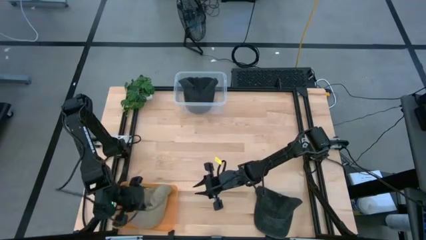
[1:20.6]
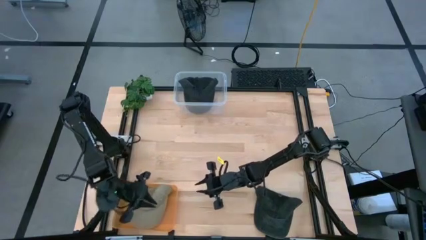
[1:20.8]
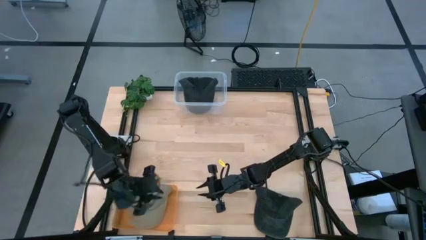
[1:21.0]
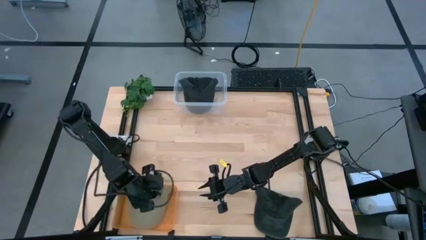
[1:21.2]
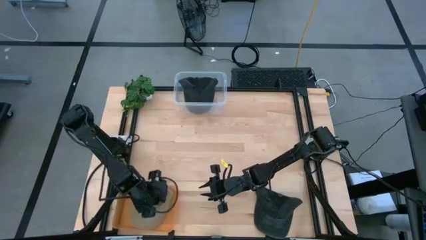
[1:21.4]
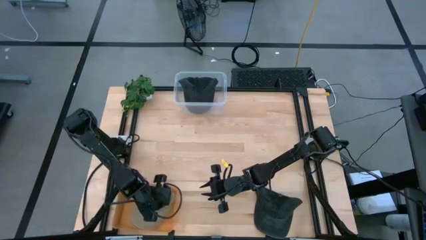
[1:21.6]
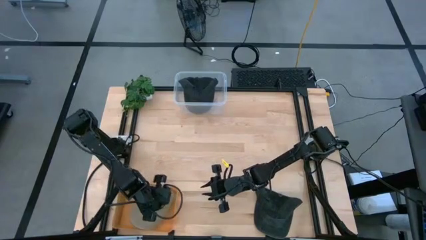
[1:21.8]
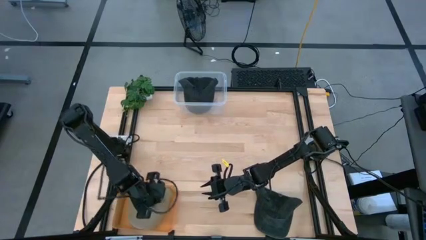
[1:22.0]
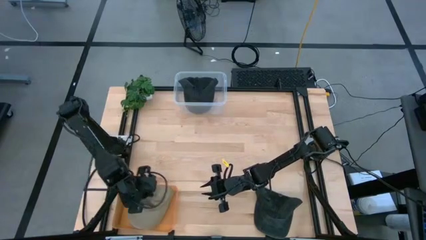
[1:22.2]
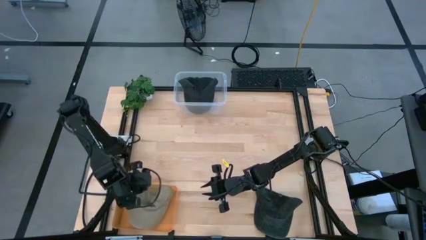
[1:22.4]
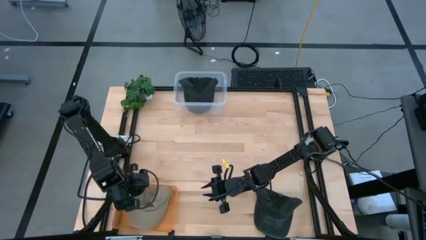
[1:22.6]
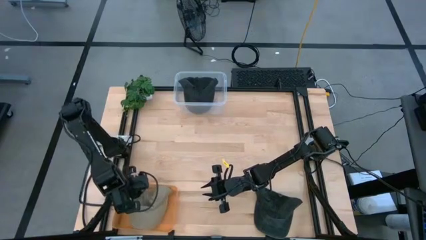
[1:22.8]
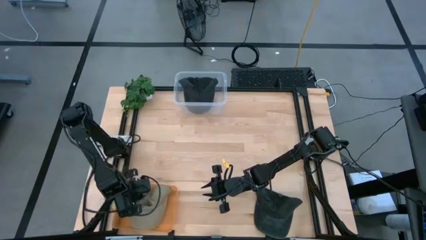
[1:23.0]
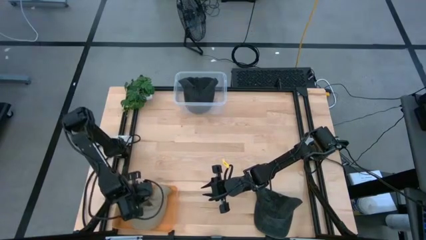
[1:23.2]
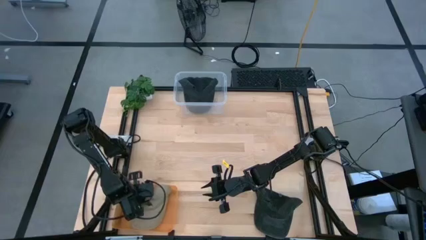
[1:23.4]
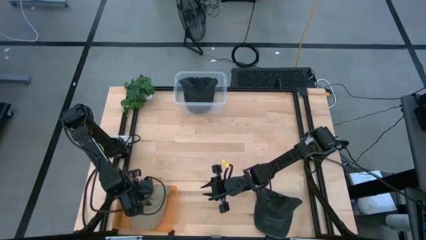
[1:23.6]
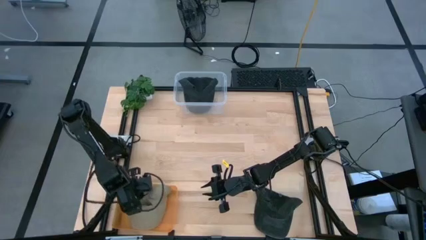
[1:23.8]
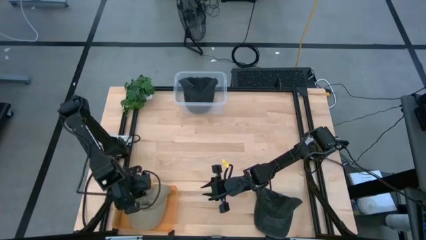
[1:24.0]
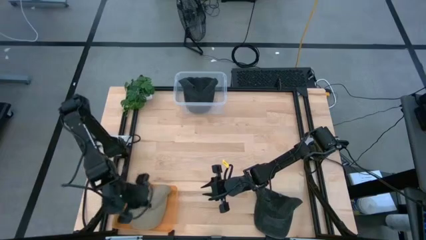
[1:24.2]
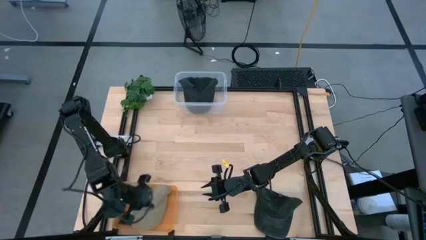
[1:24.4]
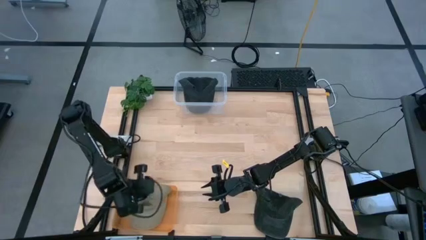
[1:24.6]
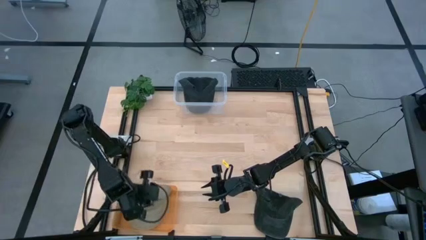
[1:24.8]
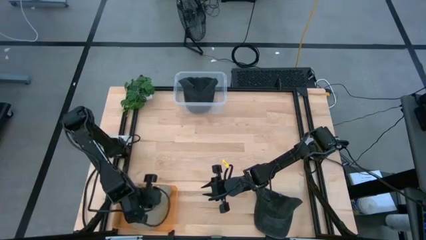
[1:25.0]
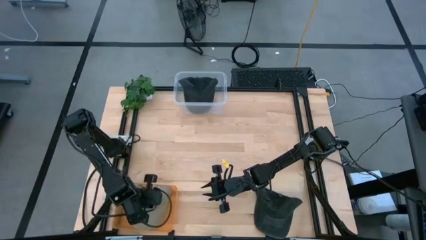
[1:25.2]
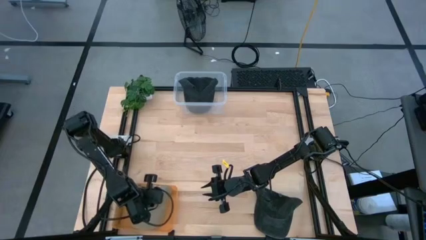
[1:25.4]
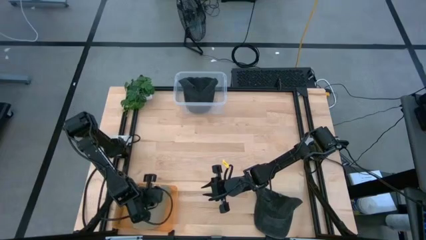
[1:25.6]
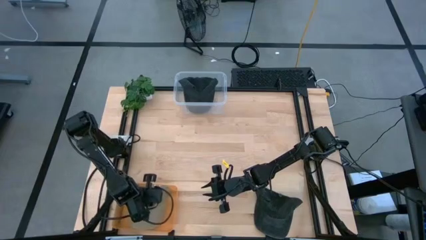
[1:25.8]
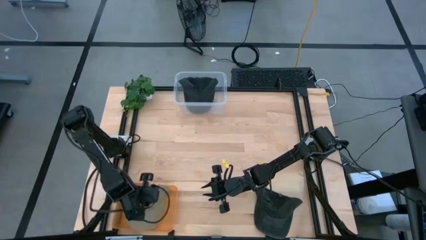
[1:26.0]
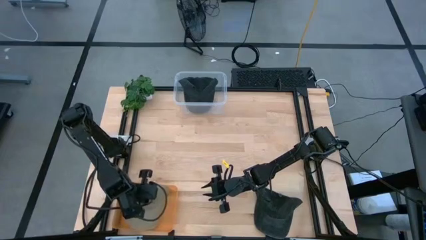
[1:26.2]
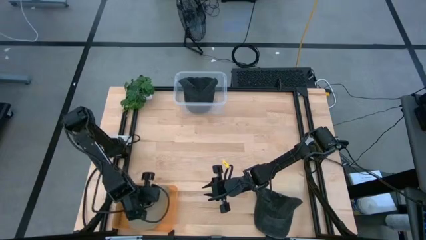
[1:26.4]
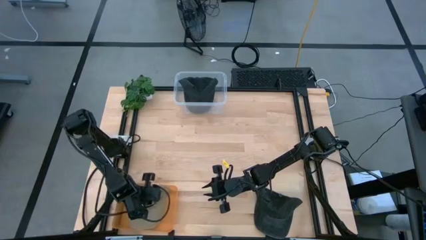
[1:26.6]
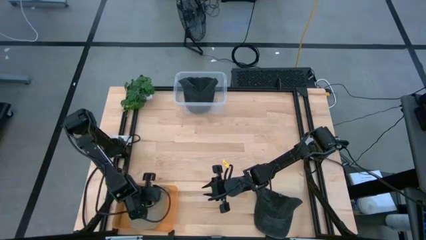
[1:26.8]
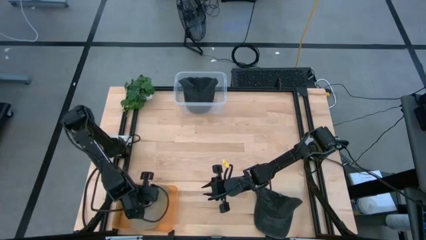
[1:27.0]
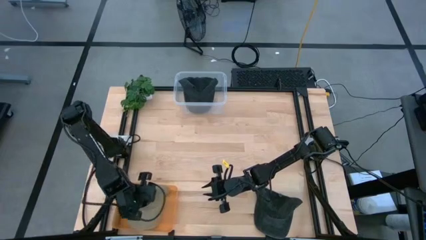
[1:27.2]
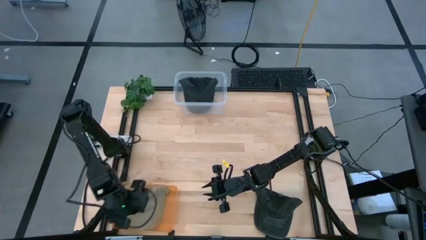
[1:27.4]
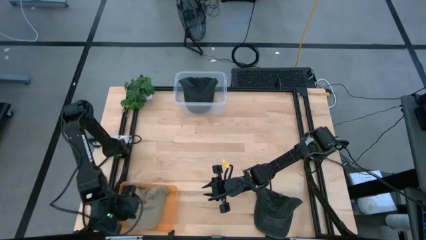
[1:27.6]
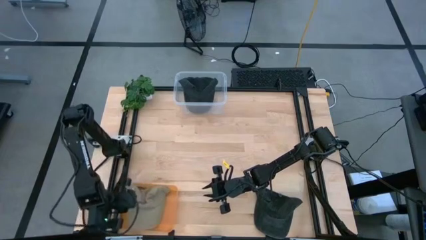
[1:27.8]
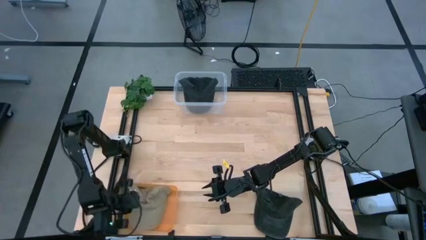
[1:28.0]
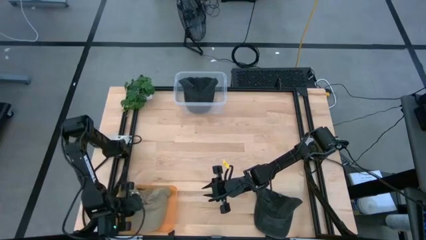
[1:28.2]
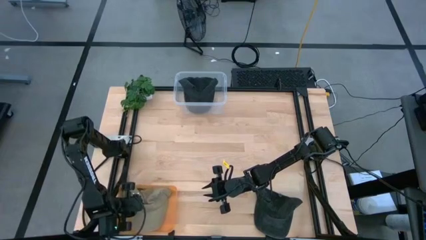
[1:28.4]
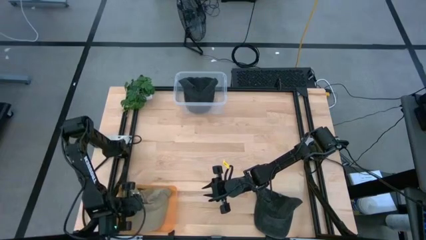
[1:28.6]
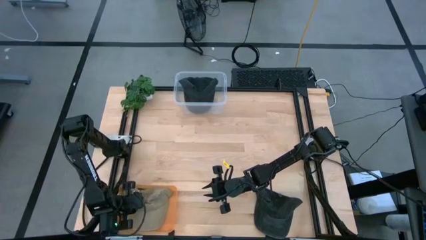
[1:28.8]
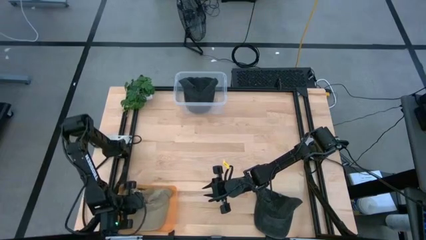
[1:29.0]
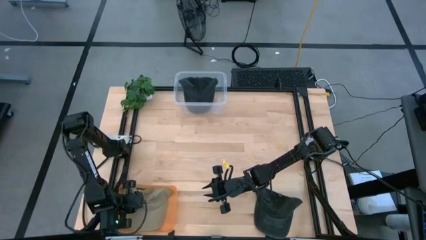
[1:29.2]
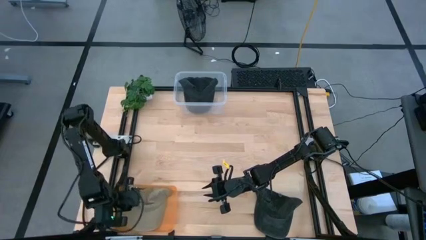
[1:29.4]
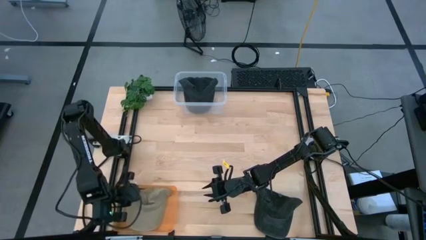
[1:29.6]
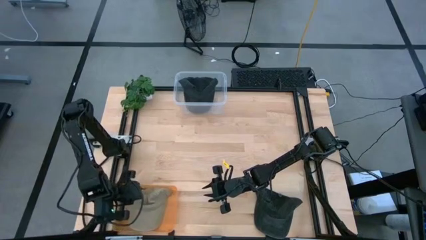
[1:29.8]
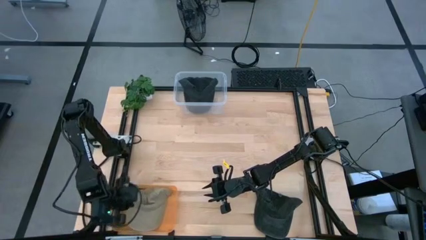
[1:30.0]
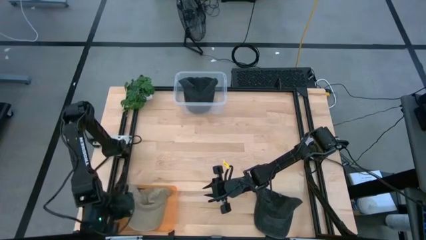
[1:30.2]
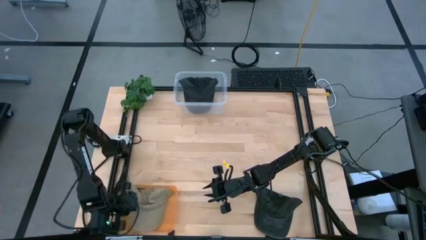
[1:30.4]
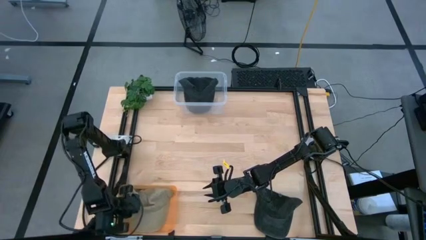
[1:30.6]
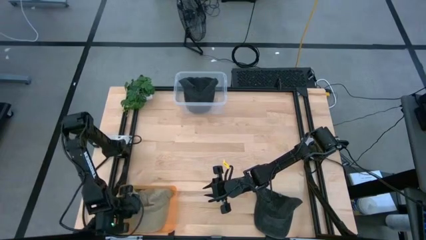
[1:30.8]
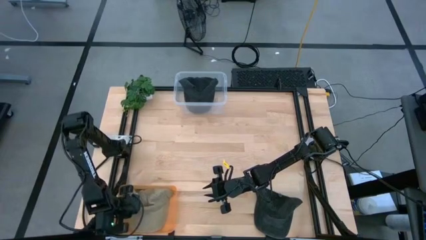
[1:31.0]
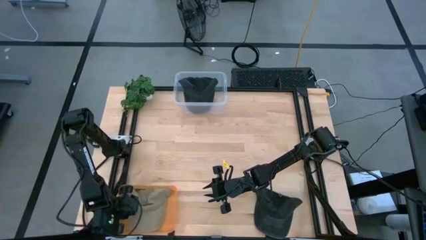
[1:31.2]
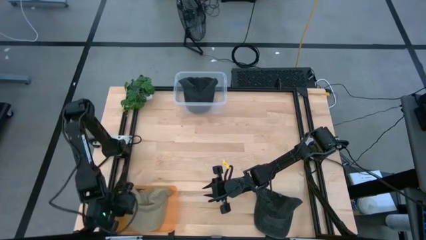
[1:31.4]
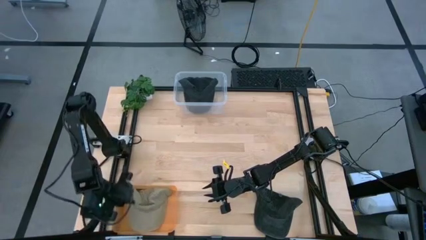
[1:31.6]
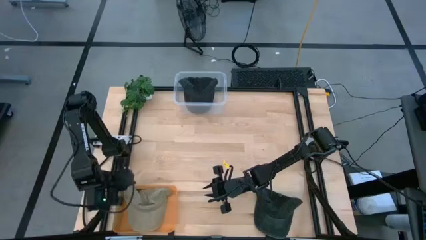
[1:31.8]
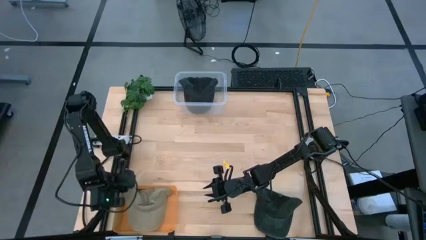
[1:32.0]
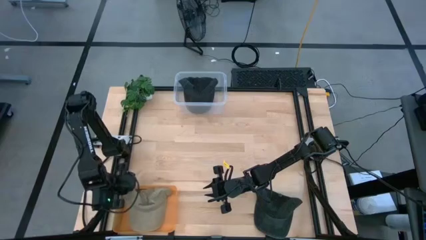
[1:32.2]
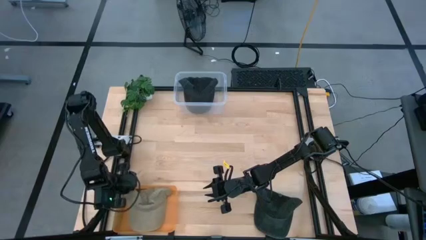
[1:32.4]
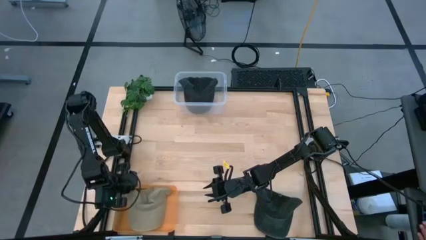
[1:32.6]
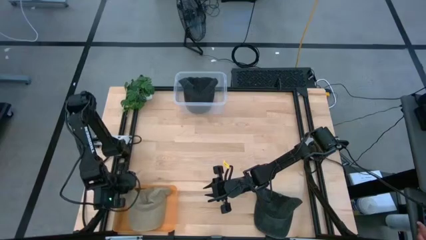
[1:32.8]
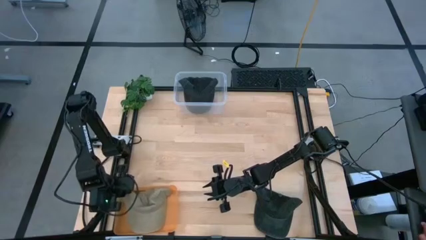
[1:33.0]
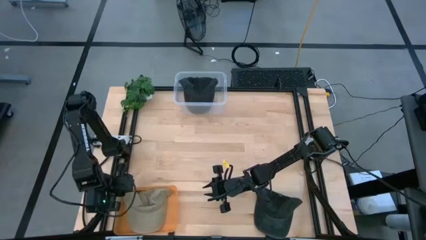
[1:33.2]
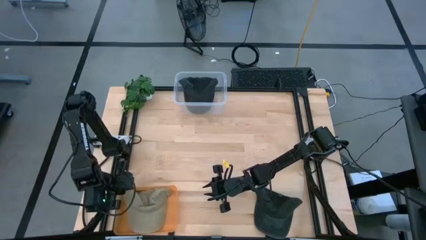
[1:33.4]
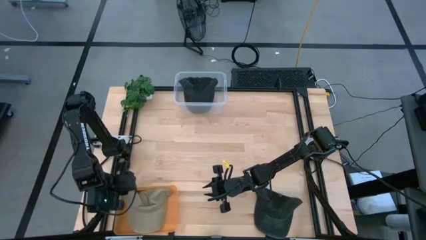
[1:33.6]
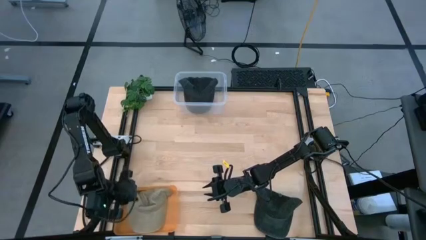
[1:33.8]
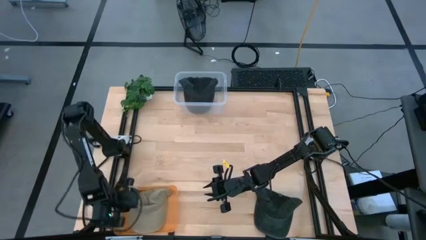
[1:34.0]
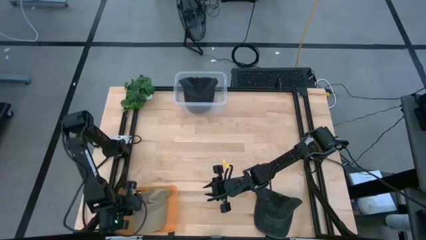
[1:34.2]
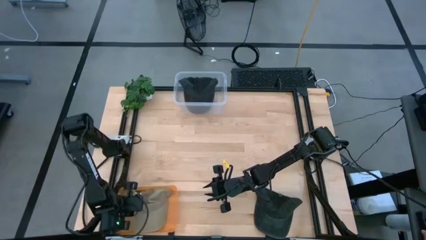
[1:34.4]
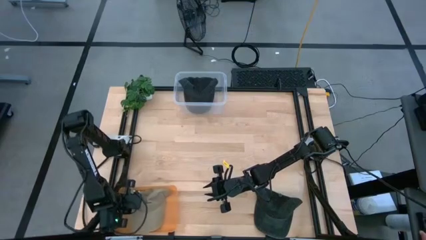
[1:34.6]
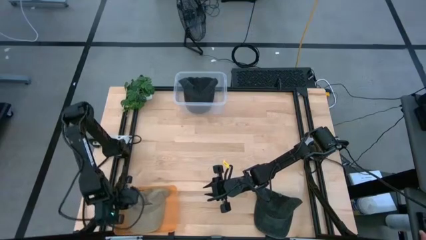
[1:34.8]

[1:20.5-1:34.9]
Task: Pick & Place hat
Put the brown cap into the orange bin
